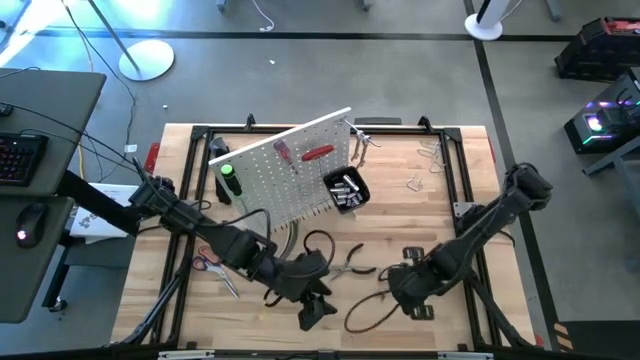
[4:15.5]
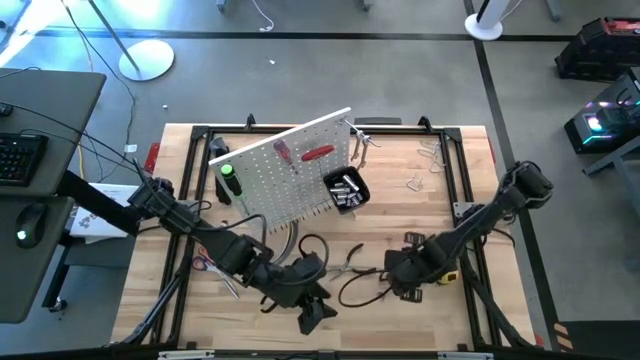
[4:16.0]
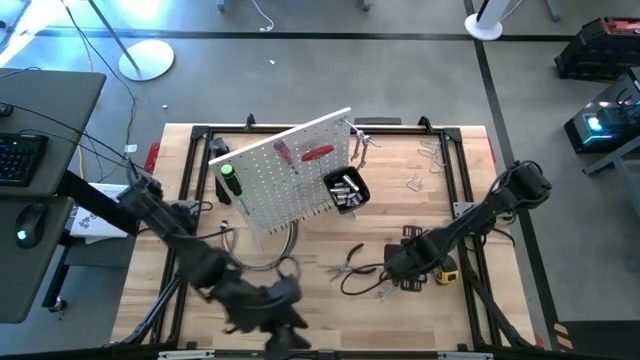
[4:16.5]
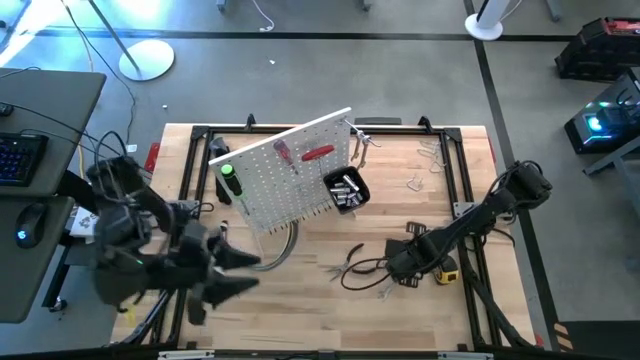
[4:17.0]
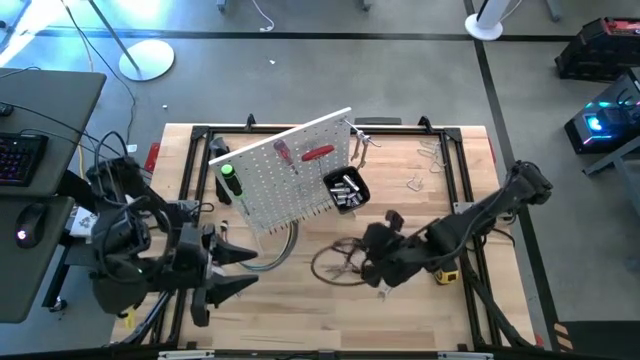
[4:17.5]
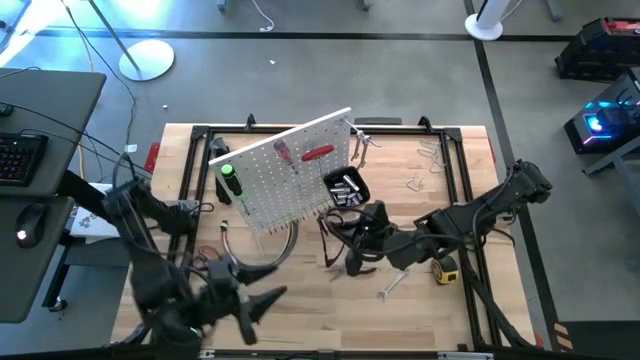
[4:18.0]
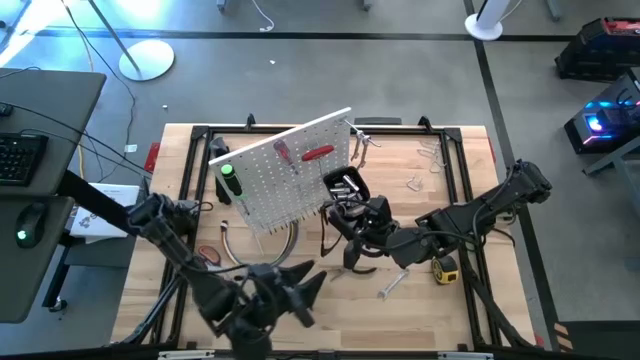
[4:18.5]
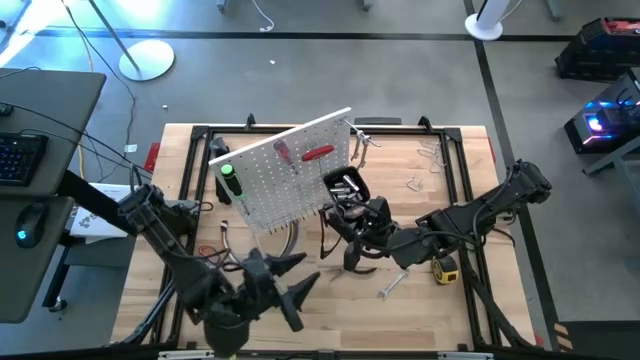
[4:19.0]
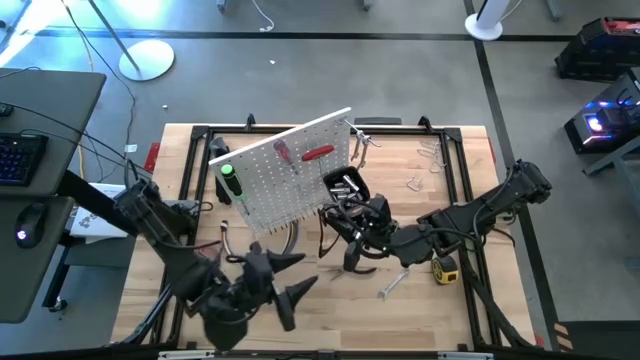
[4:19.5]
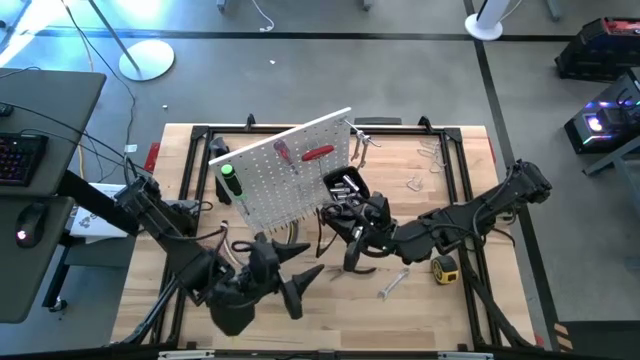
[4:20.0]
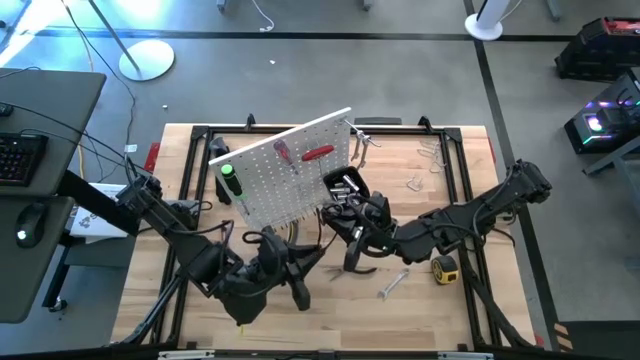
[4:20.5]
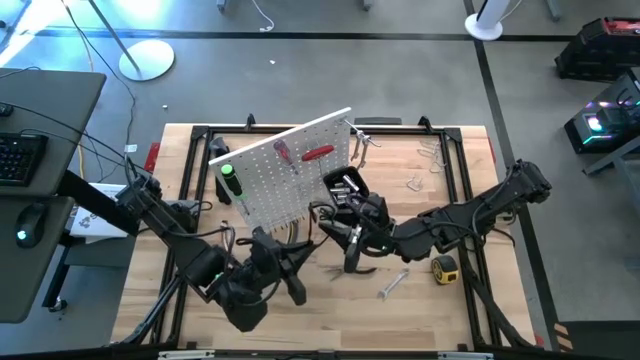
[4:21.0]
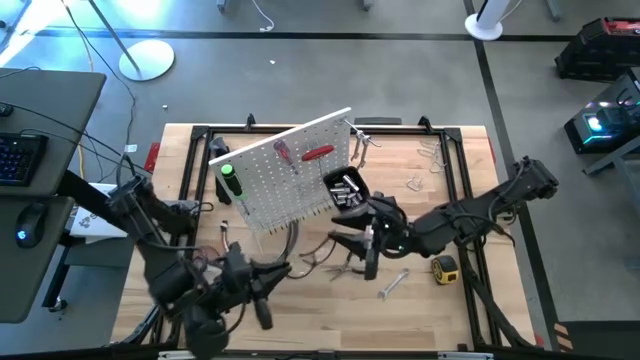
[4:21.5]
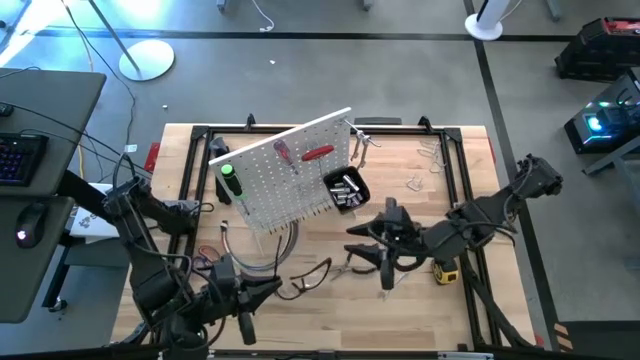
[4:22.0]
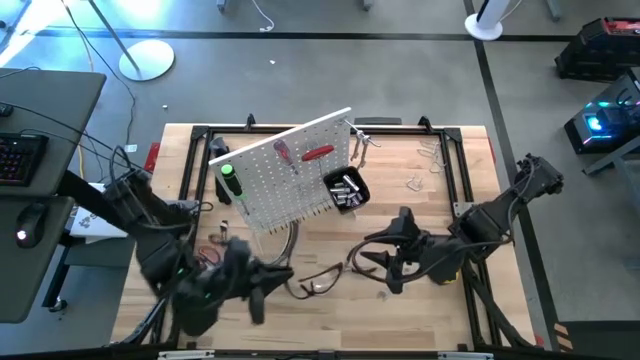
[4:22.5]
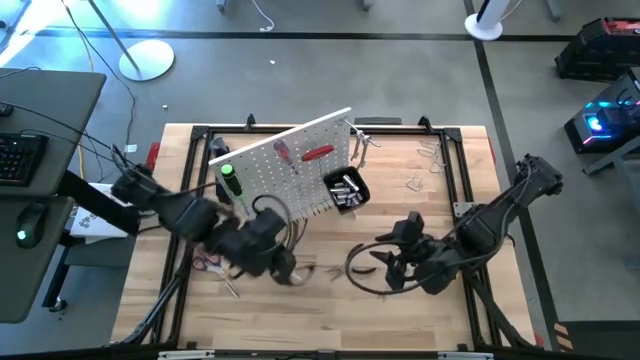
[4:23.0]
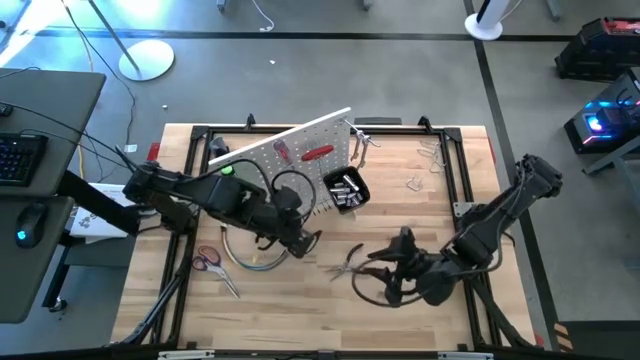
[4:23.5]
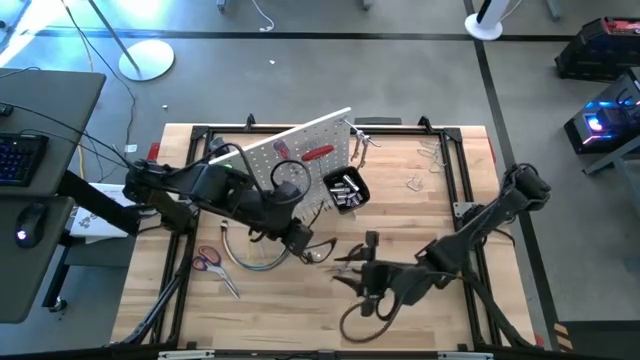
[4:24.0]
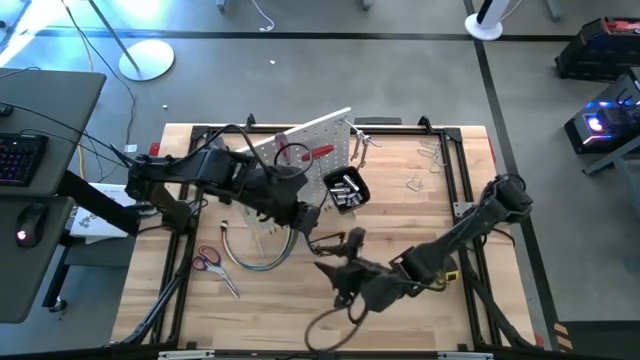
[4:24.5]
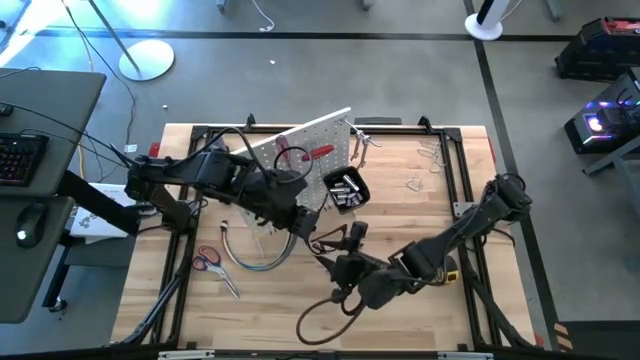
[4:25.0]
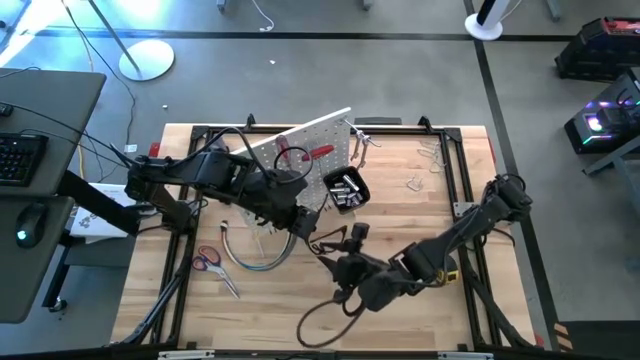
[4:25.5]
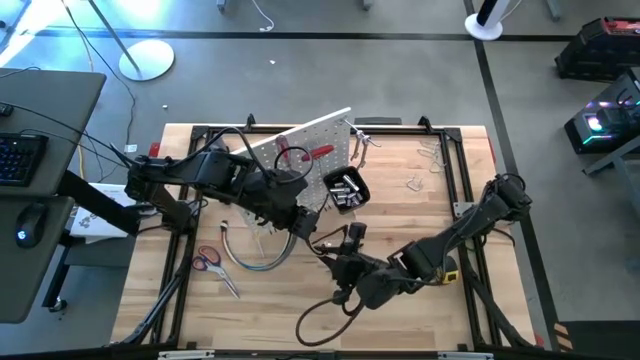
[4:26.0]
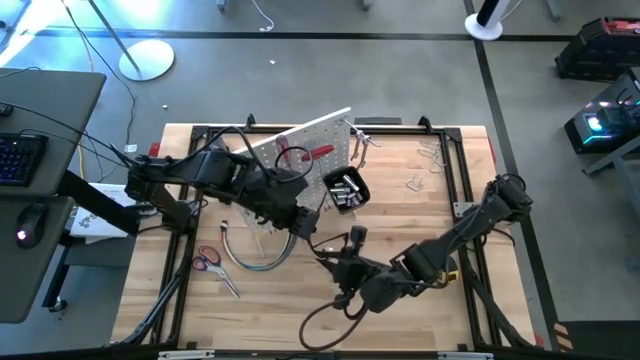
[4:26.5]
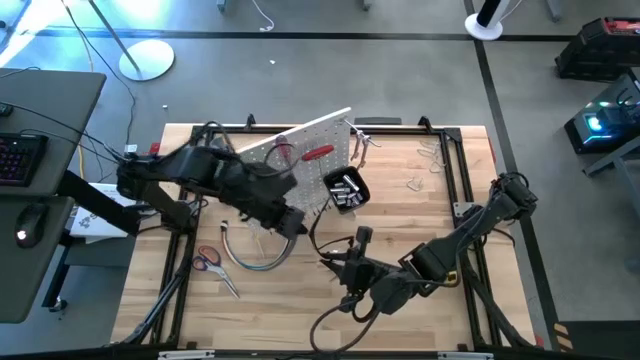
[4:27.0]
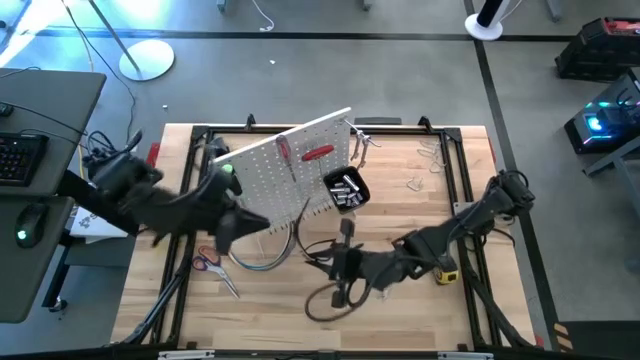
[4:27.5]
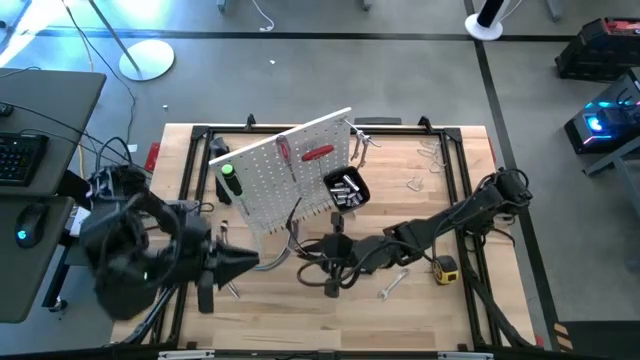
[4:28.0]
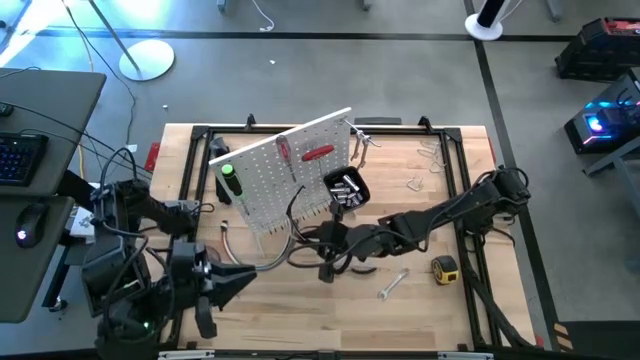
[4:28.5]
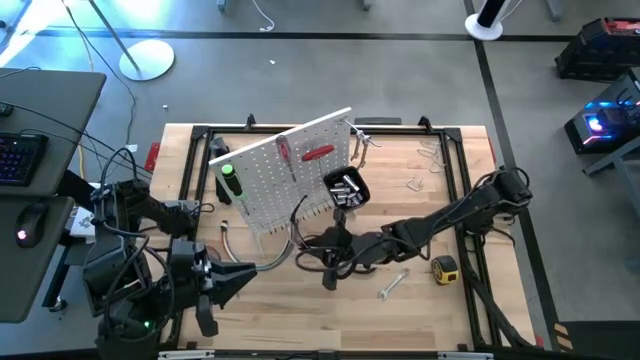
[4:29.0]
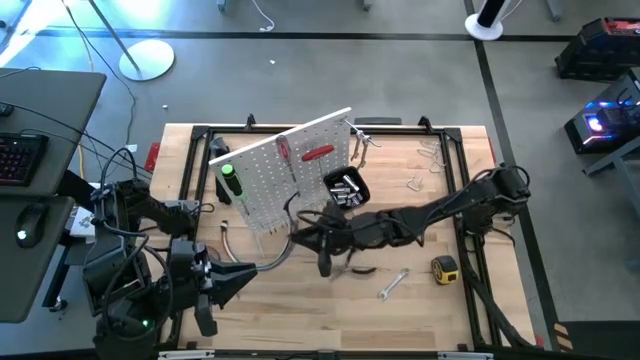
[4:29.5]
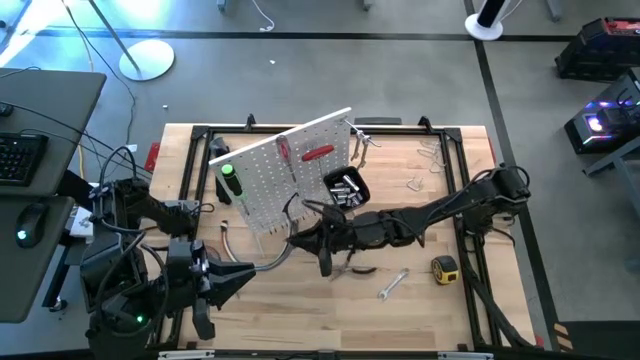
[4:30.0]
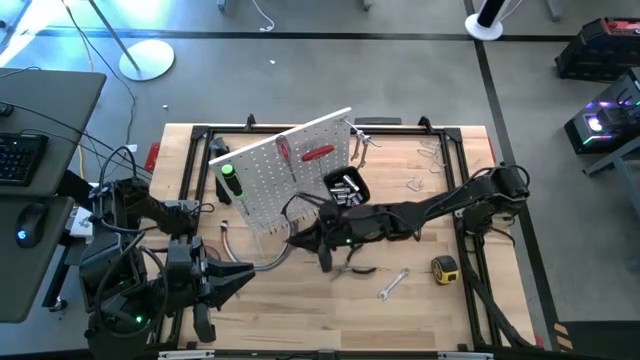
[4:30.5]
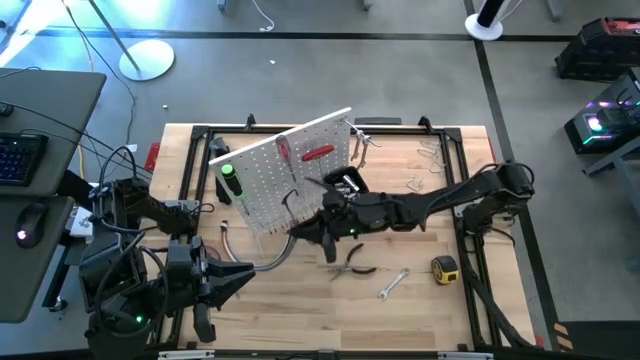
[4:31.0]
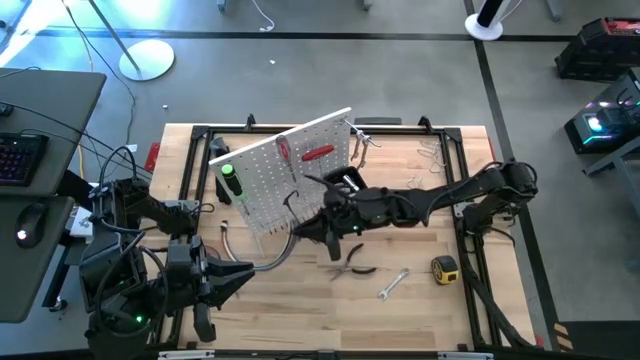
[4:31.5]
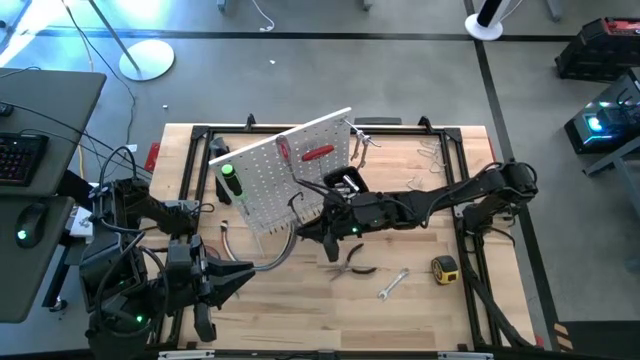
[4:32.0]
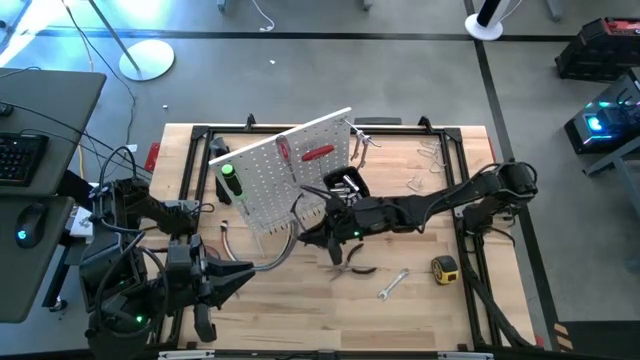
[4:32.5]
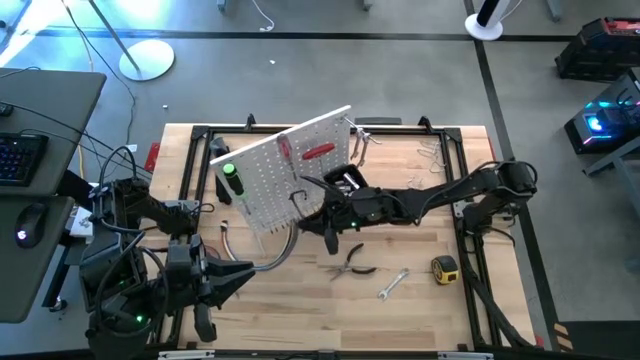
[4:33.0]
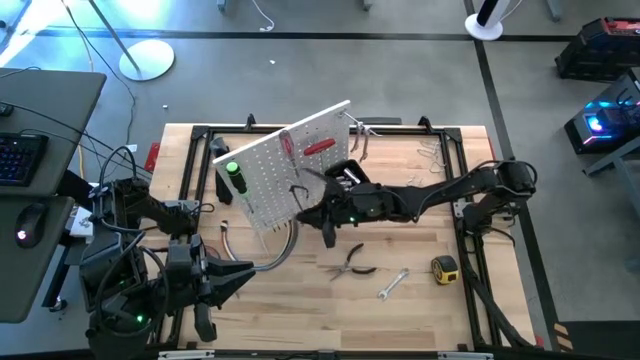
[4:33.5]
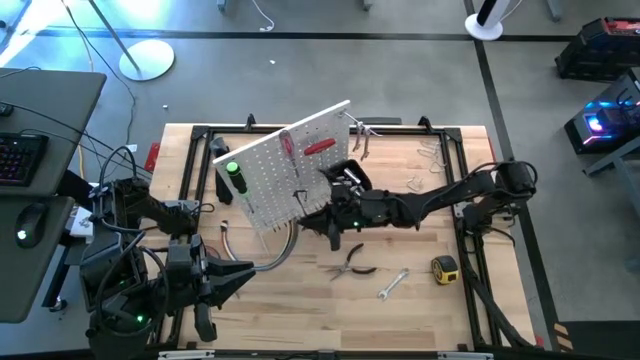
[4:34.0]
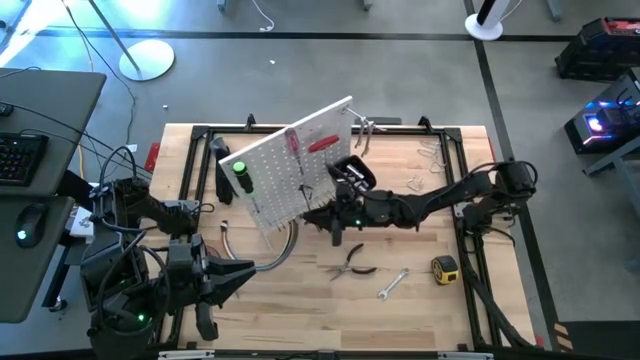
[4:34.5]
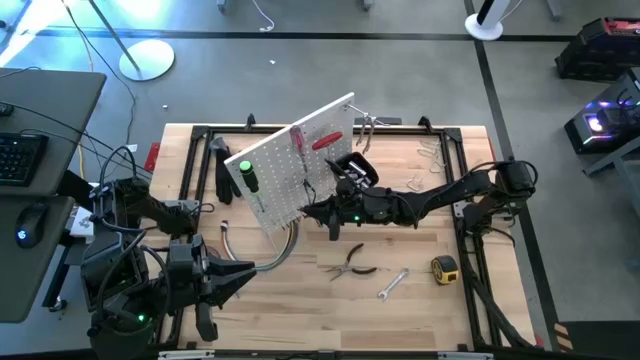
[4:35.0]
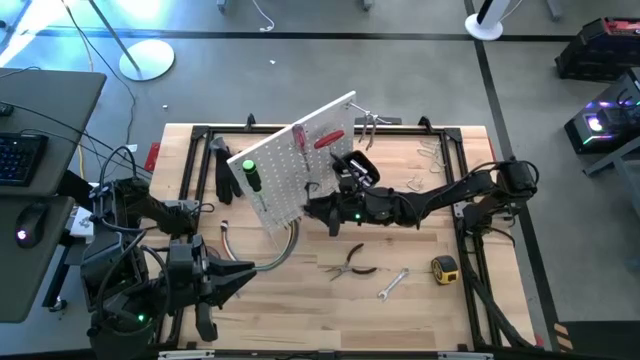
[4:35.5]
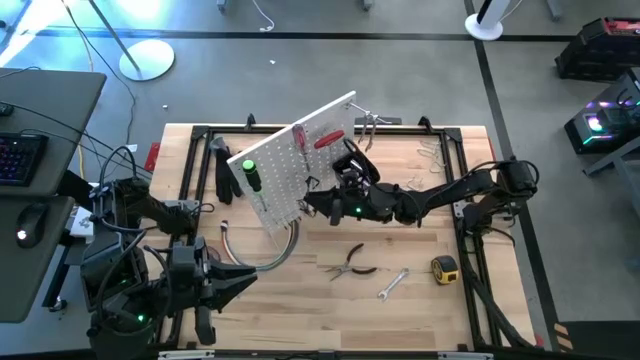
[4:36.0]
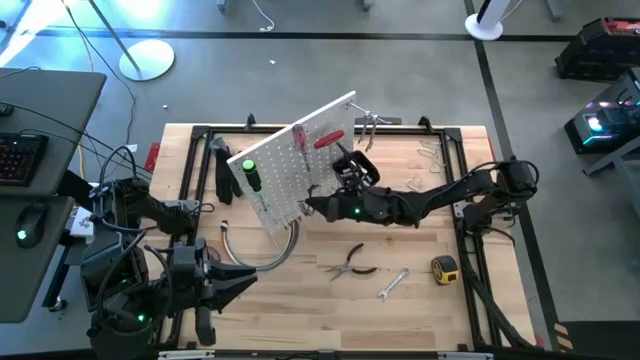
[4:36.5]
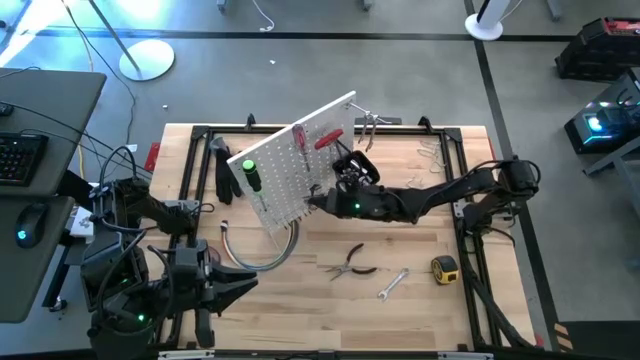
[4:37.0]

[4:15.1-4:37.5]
Task: Hang tools onto peg board
Hang the safety glasses on the peg board
